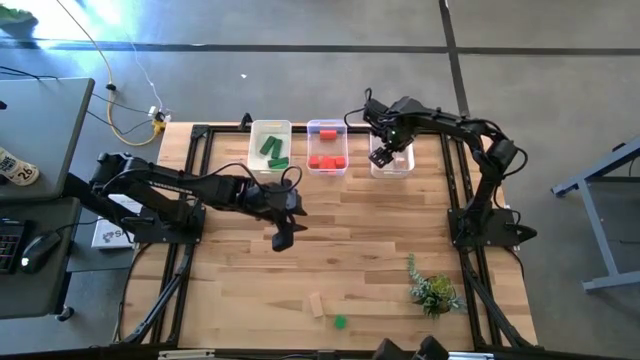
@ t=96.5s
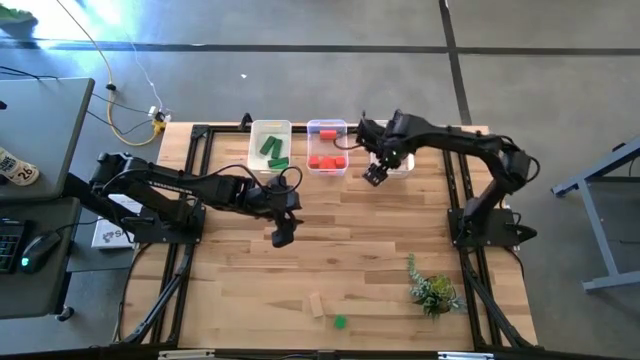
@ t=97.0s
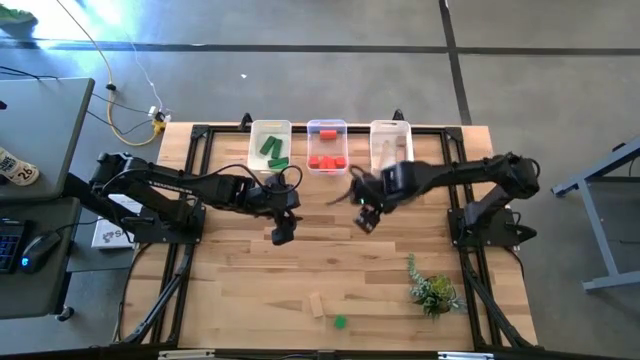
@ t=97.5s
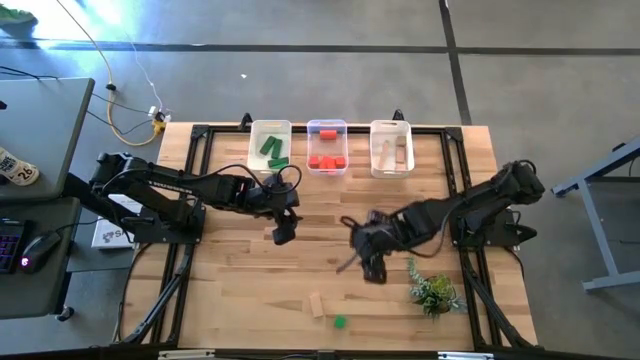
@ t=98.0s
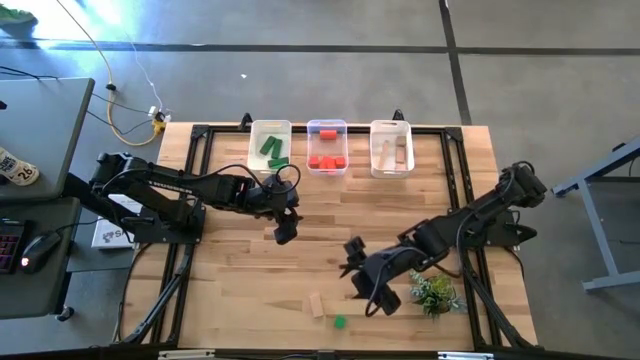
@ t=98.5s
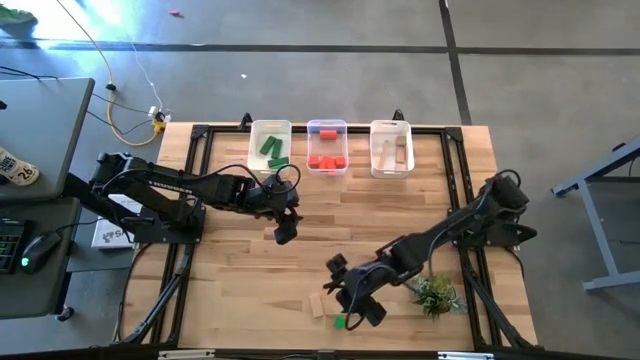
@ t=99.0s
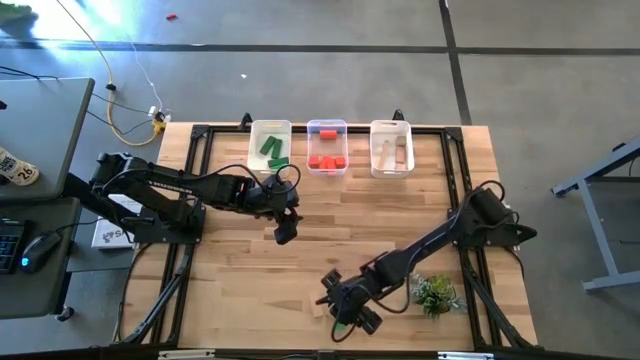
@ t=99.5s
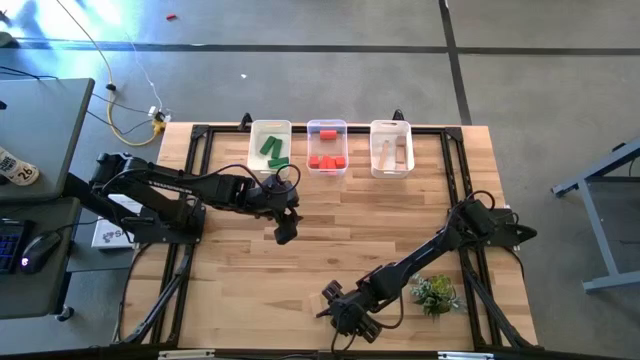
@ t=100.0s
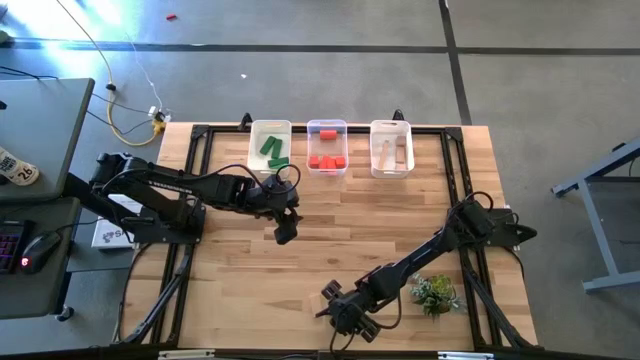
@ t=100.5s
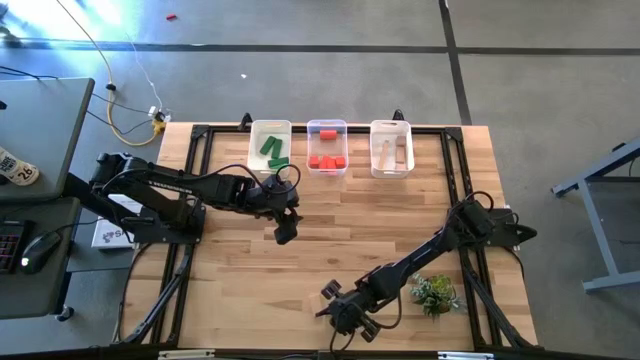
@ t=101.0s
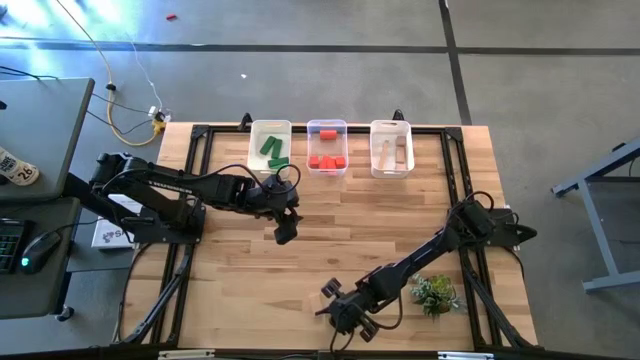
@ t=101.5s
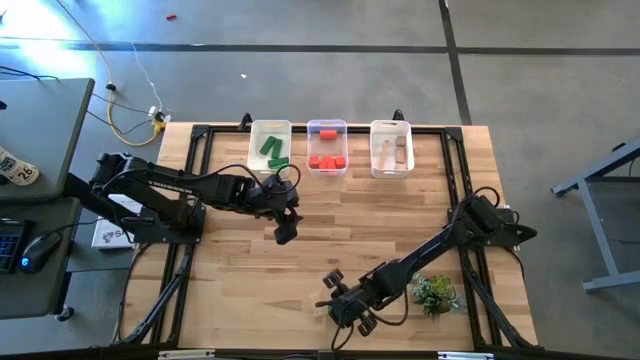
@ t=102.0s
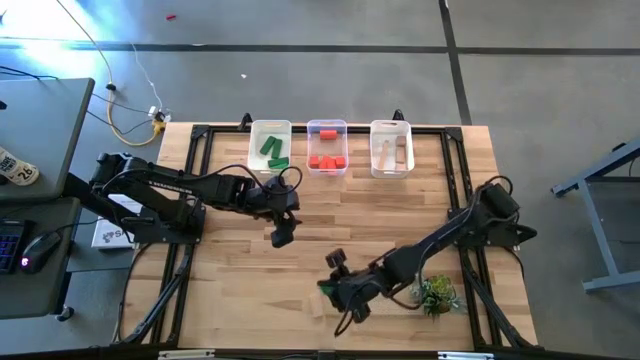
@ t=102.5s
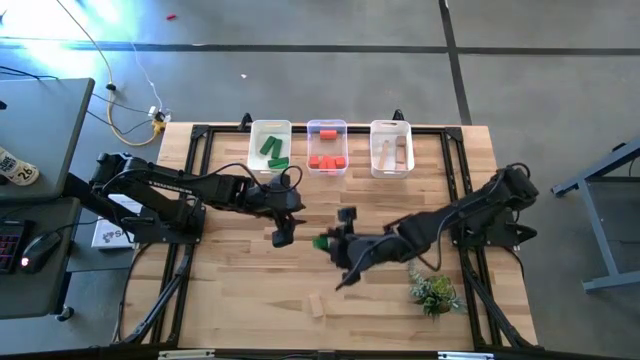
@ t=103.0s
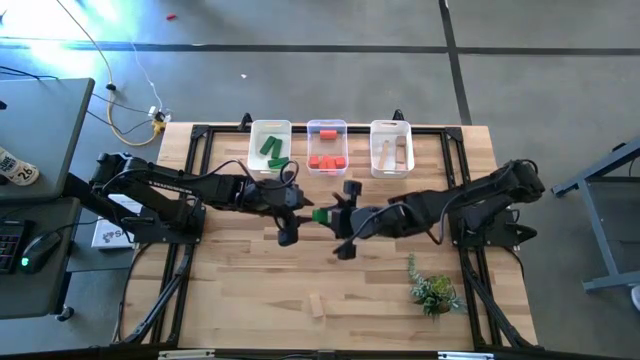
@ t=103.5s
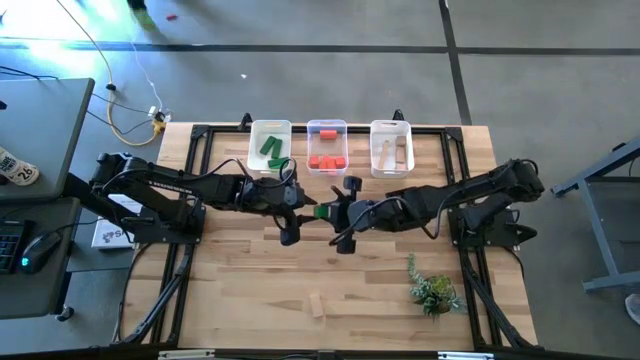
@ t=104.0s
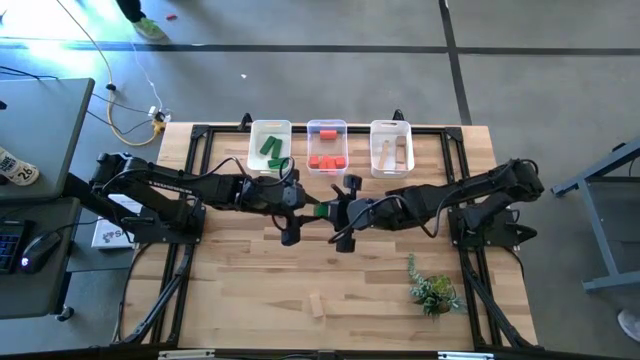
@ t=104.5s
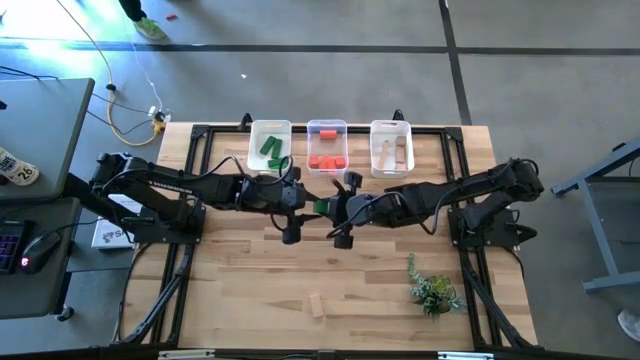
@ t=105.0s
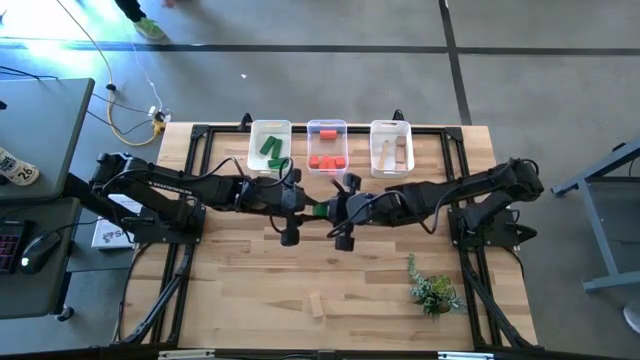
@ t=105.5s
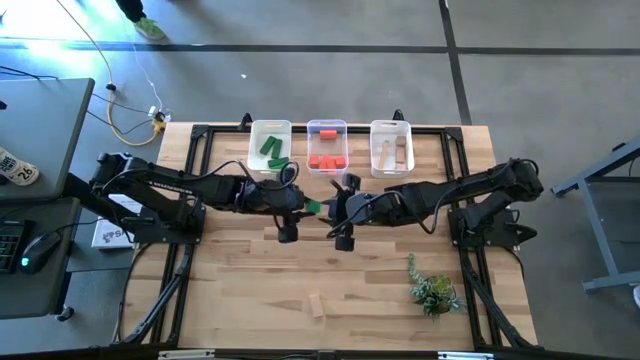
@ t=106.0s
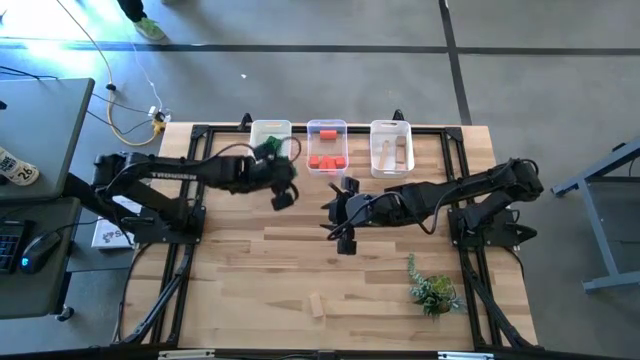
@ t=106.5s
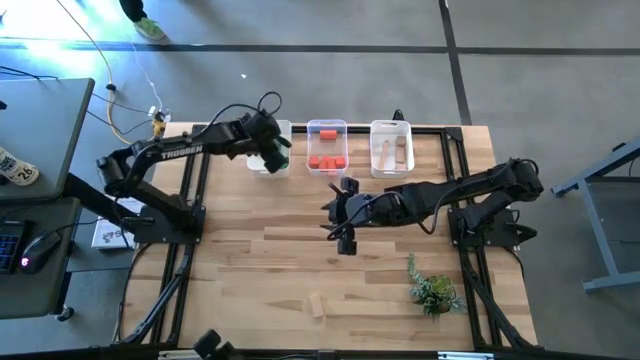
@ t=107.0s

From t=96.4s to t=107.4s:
Task: Sort & place blocks by color
Put the green block into the left white bin

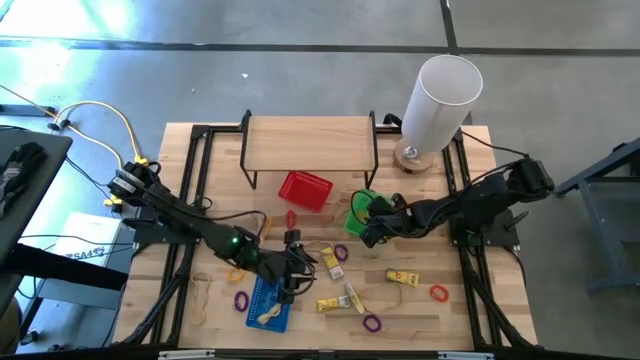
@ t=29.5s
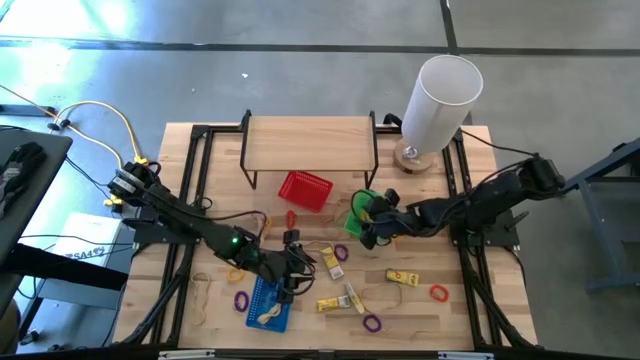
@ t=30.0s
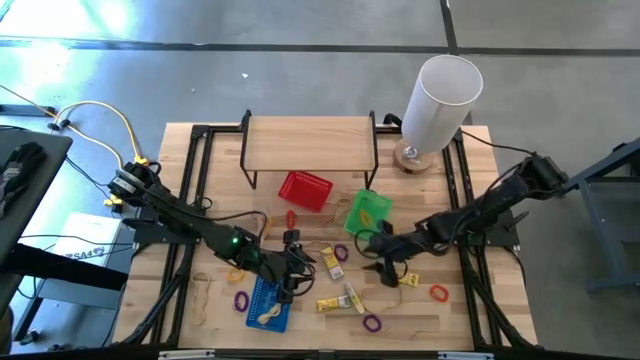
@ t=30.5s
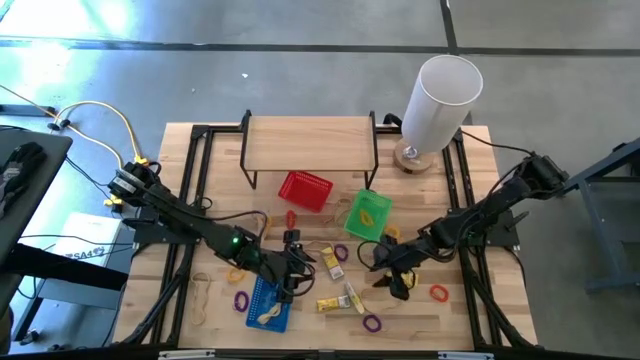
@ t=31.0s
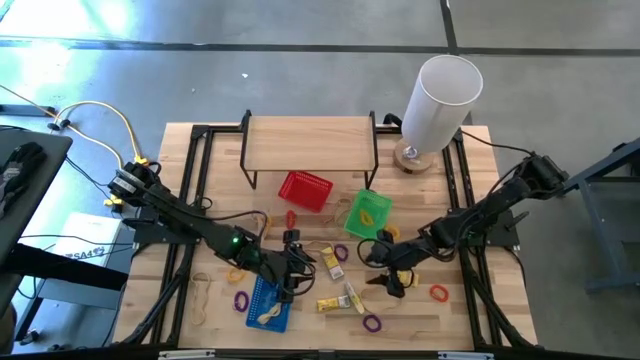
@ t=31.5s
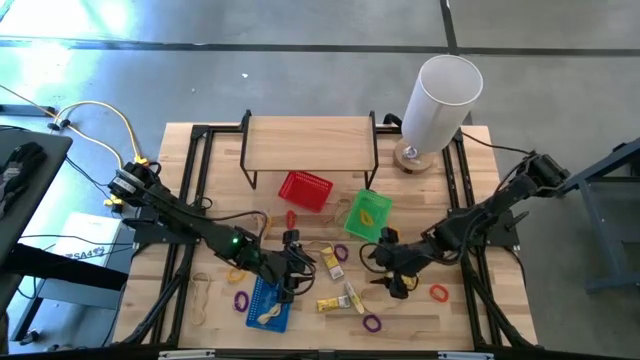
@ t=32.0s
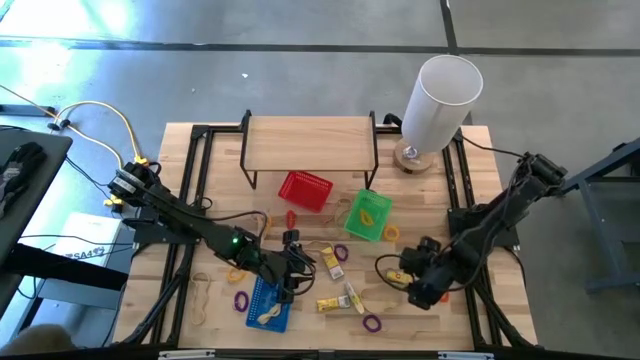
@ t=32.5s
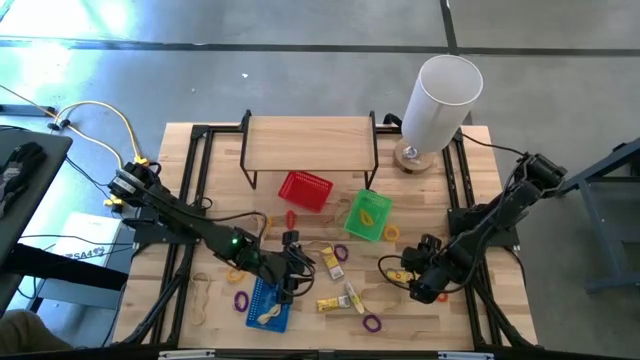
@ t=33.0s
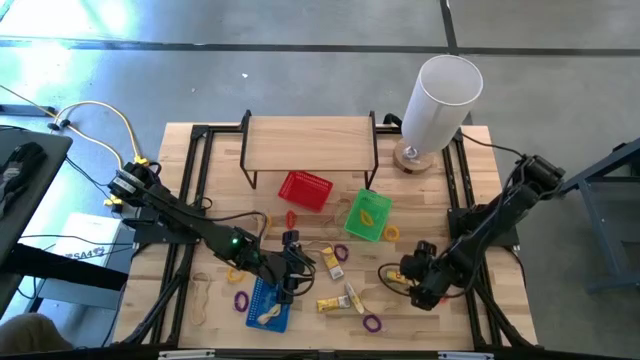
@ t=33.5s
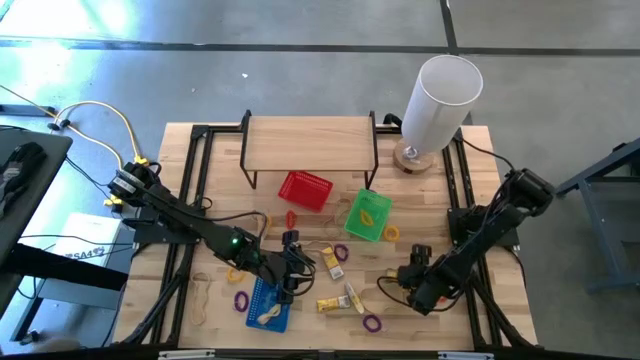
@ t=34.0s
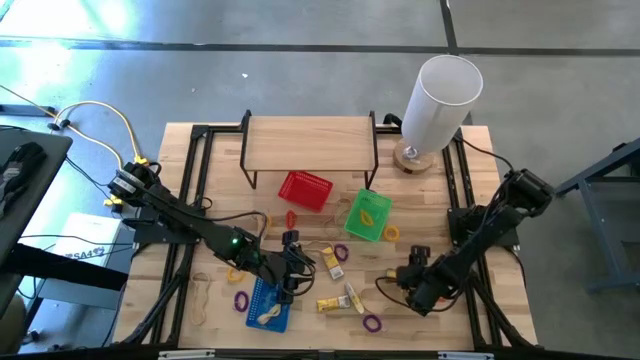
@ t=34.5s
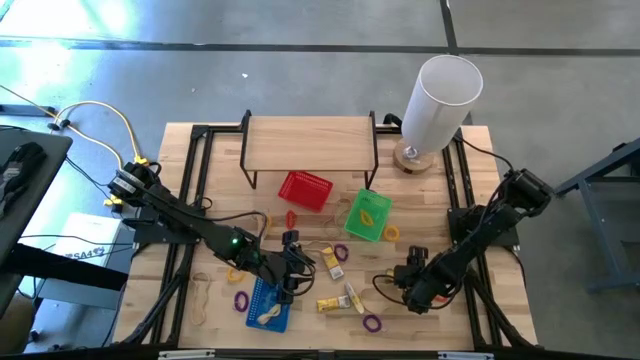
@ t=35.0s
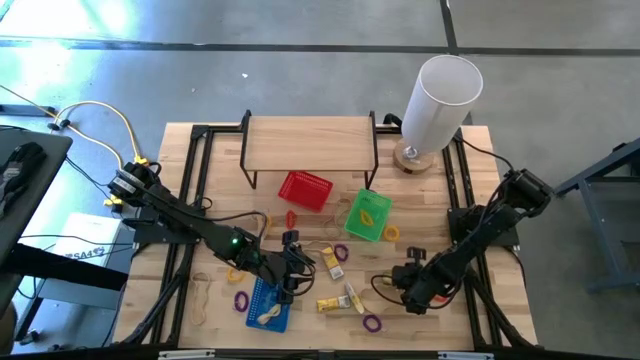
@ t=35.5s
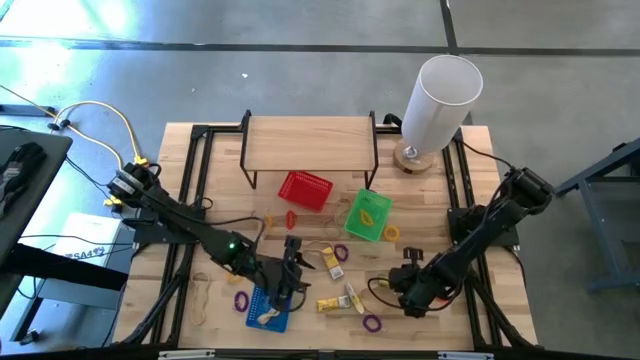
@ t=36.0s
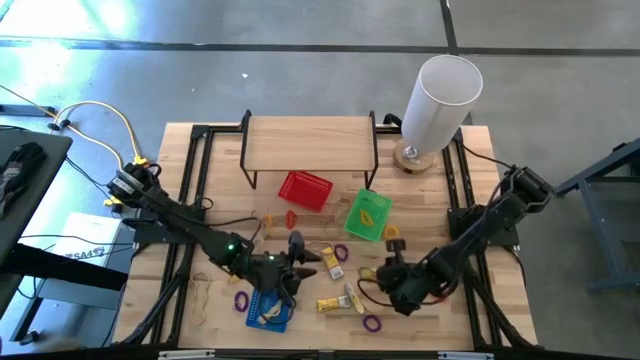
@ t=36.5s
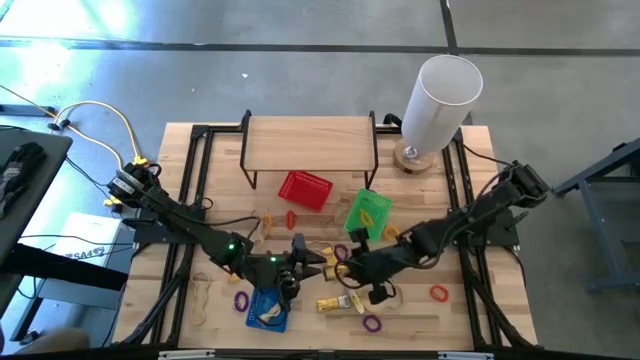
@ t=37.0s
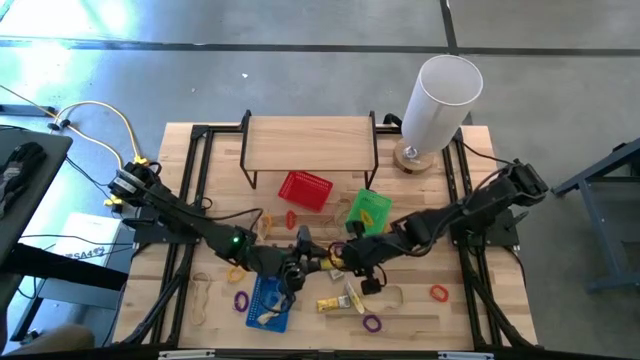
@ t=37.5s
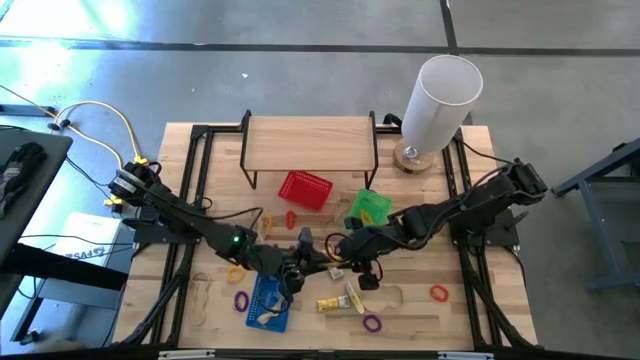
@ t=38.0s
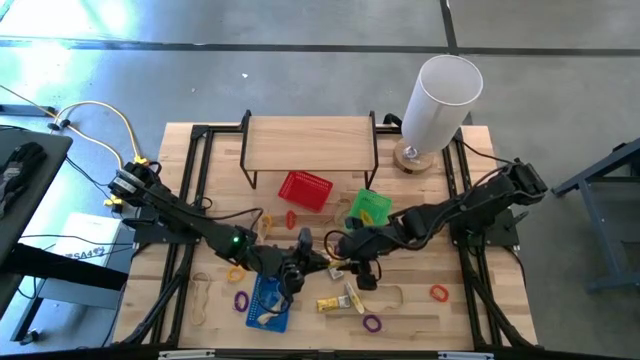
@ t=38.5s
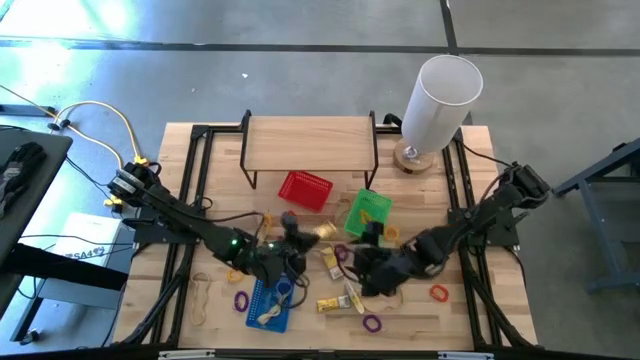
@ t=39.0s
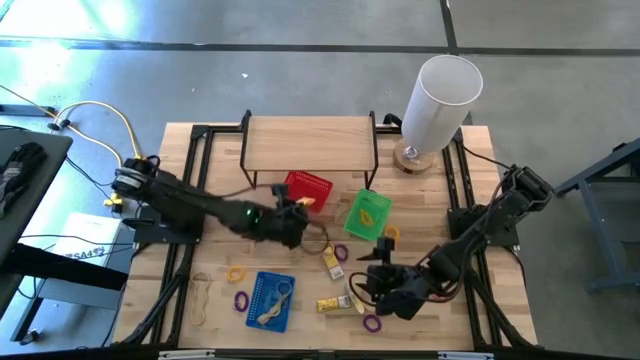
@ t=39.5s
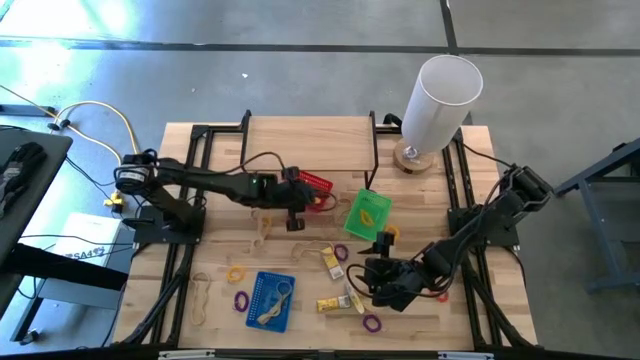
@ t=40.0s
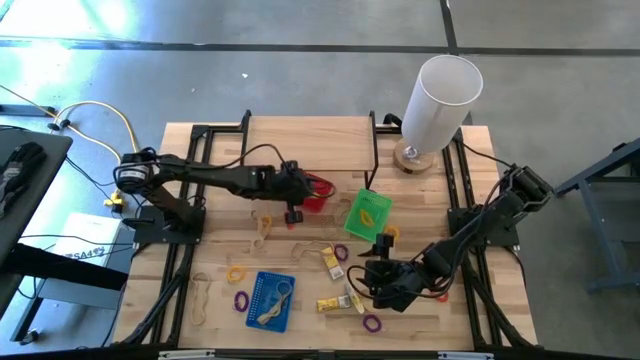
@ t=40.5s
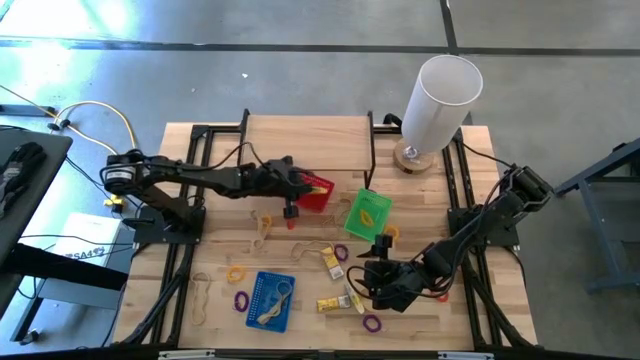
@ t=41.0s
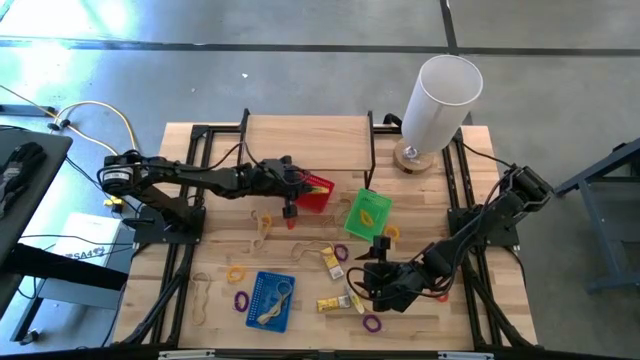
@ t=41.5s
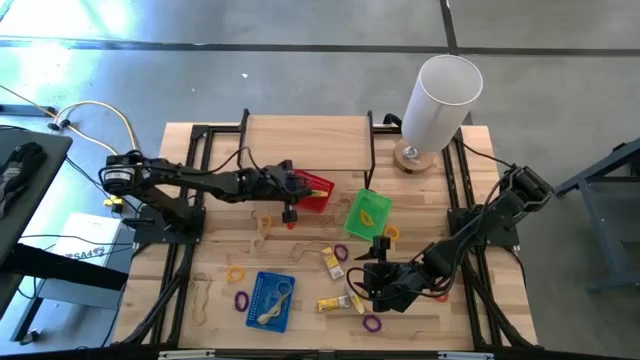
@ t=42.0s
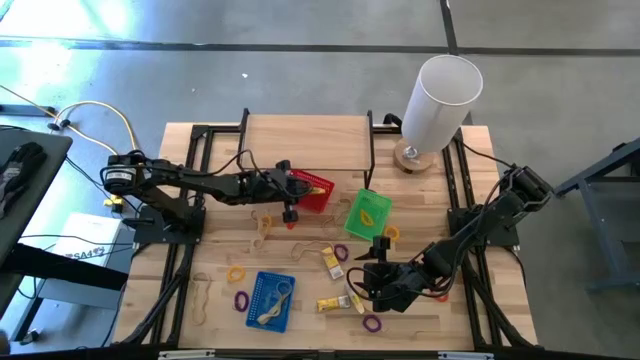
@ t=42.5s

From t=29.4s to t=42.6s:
Task: Pick & Place Office Desk Supplies
Put the yellow crayon box into the red bin
